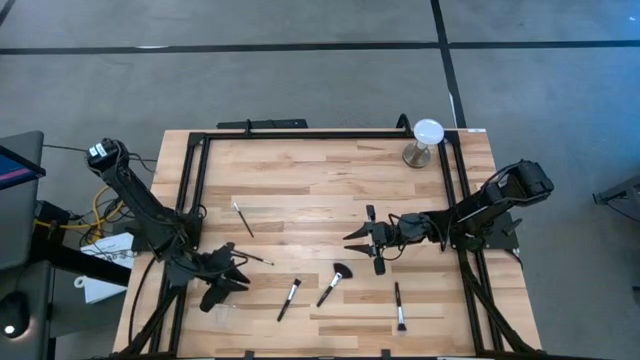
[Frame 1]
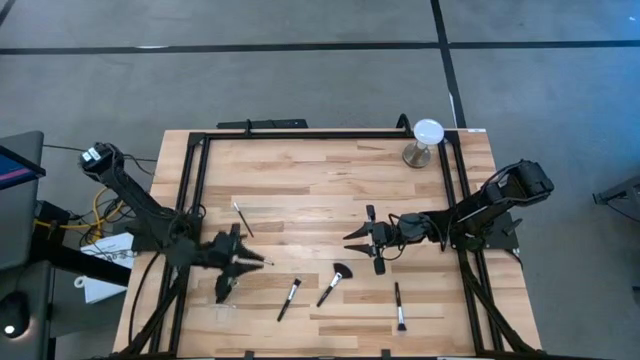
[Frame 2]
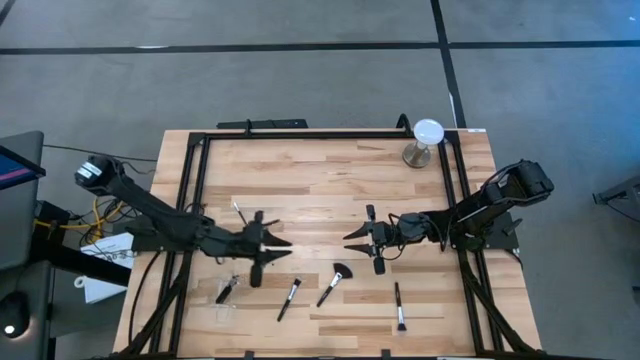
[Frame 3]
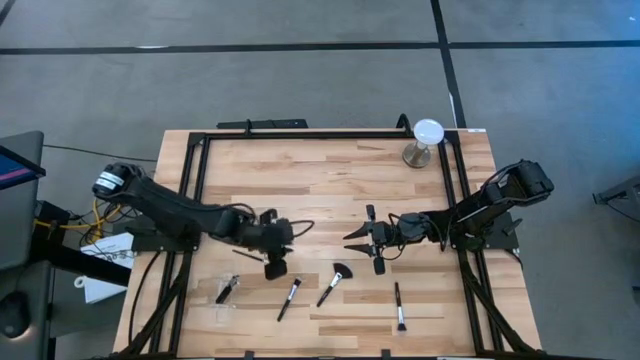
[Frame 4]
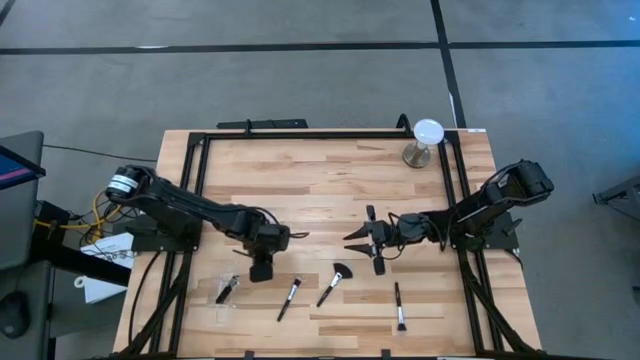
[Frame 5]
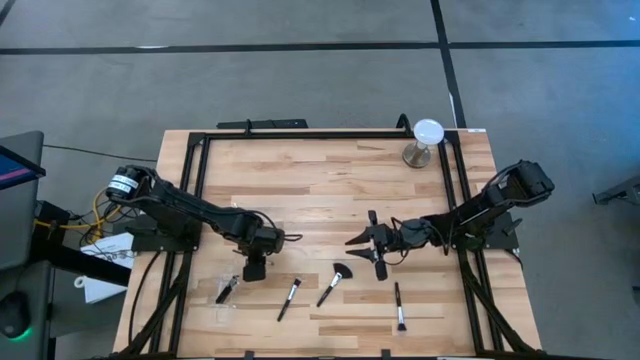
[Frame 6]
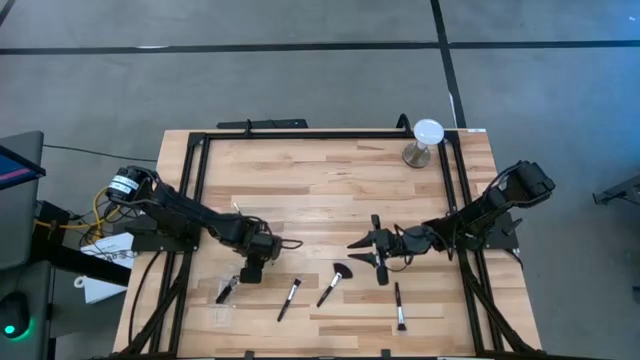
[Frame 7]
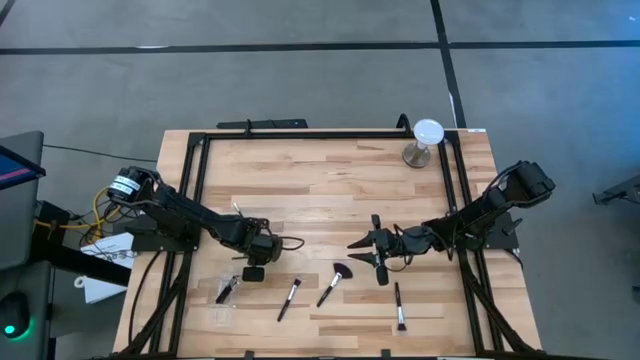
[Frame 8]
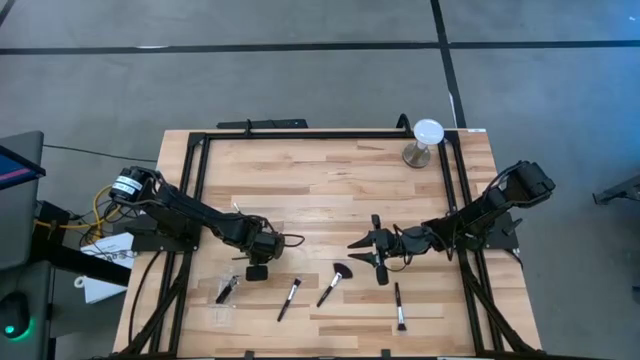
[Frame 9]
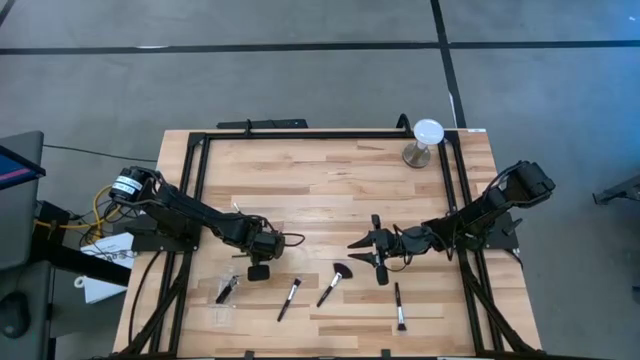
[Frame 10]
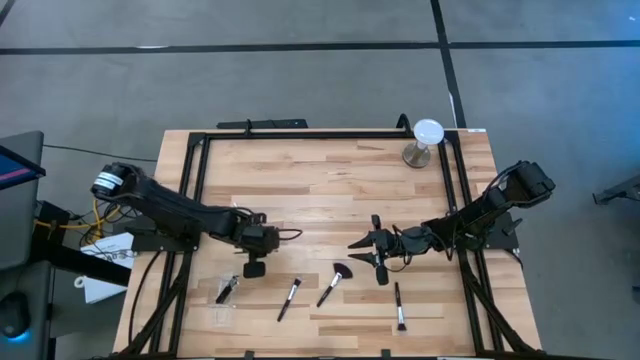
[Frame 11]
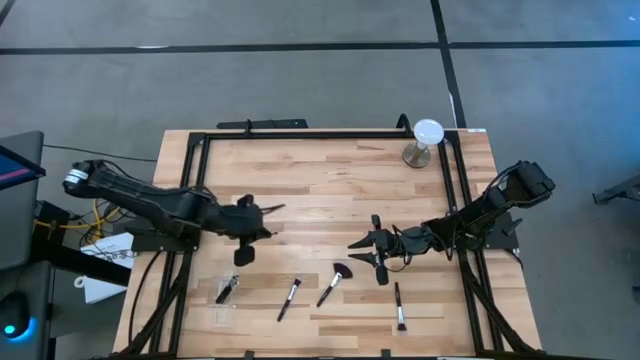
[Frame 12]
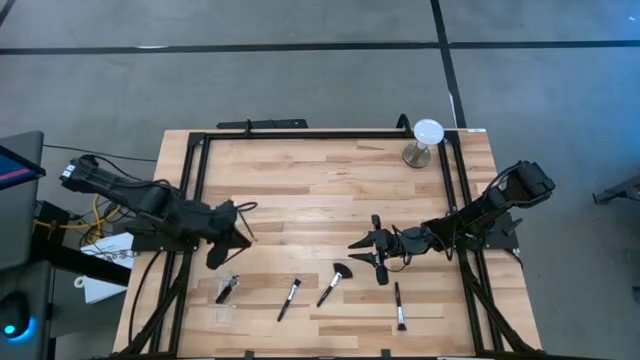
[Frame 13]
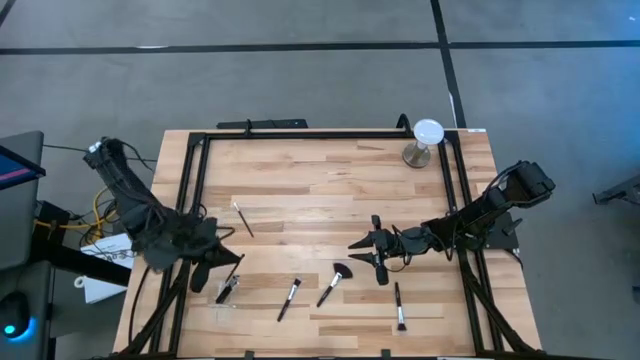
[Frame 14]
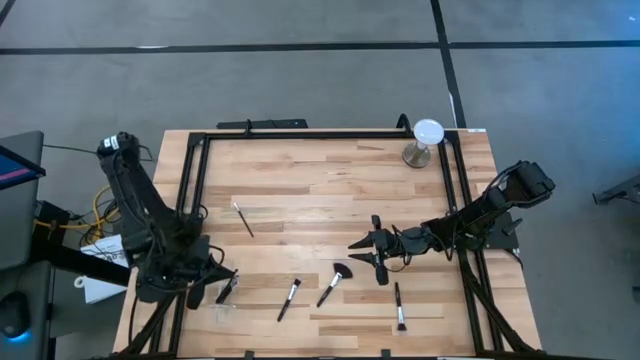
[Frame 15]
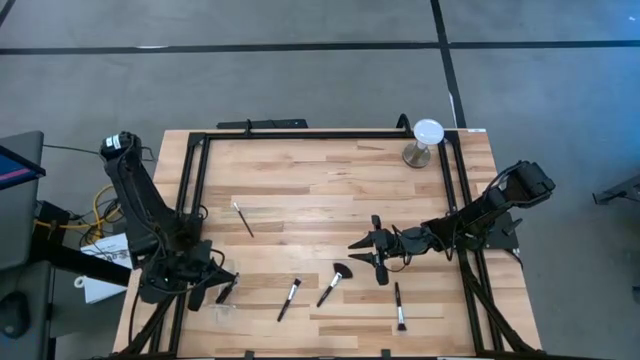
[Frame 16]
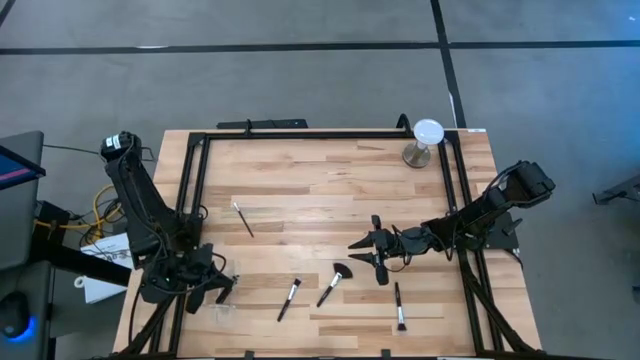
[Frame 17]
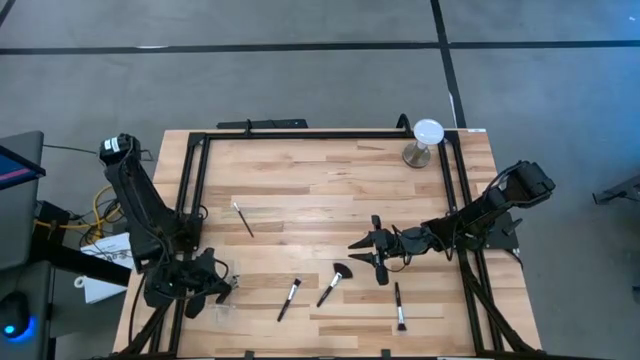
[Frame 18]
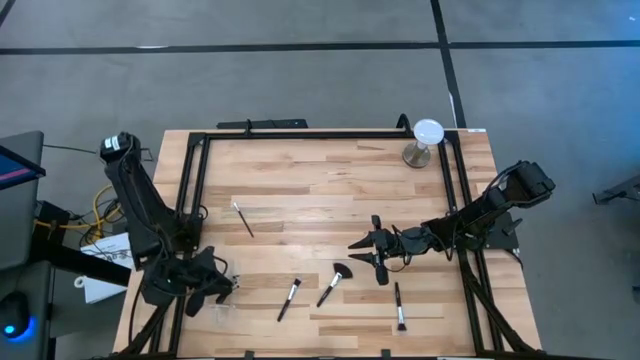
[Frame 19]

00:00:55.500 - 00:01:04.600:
Task: Put items in baskets/containers
Put the eyeshadow brush into the transparent organizer

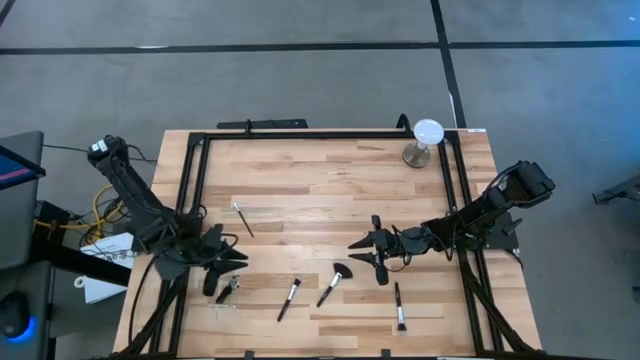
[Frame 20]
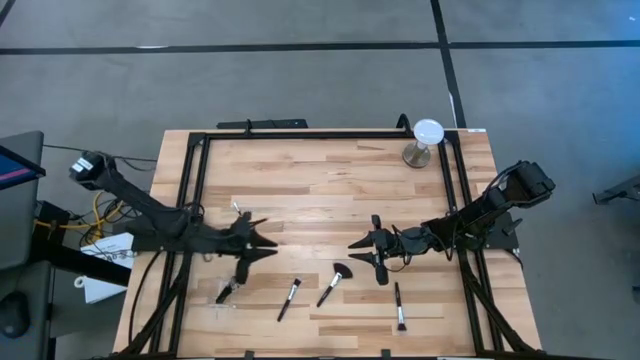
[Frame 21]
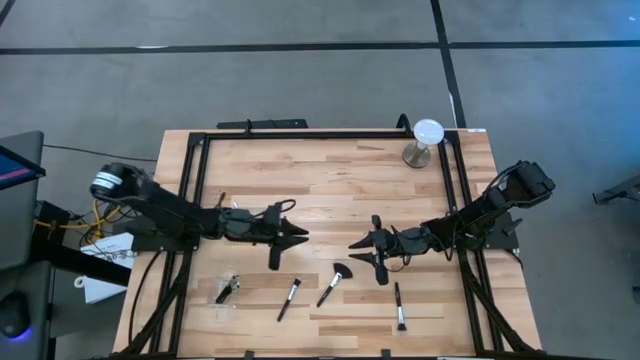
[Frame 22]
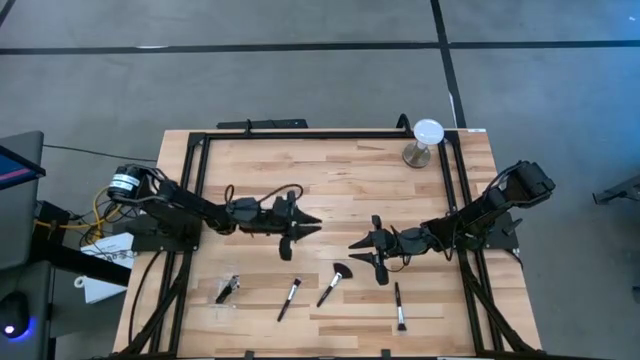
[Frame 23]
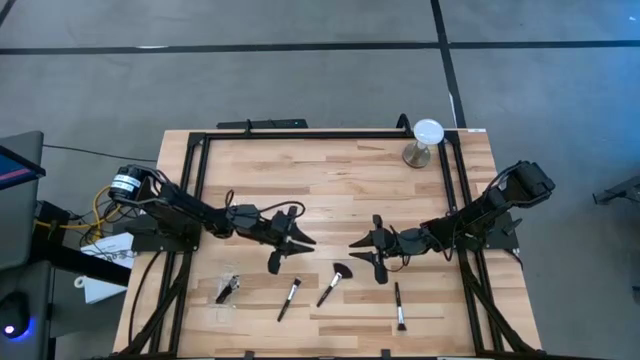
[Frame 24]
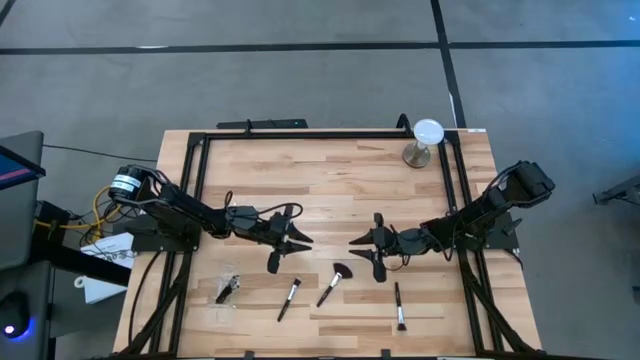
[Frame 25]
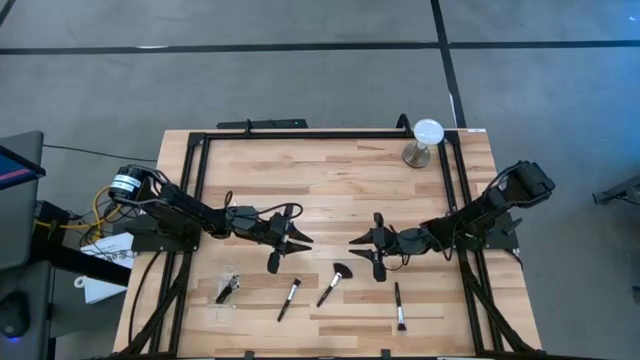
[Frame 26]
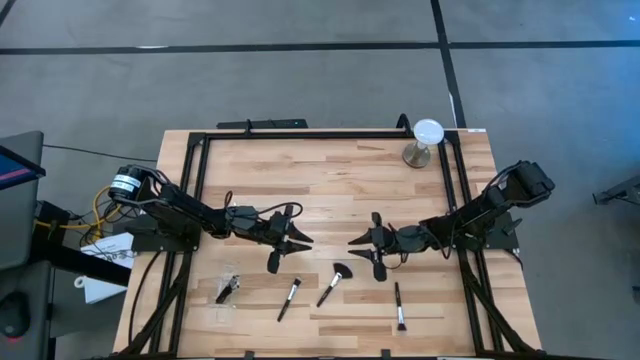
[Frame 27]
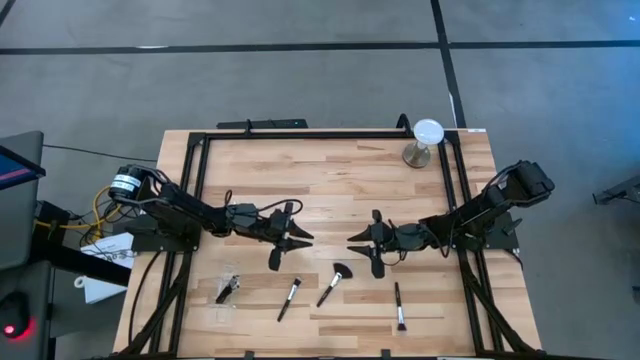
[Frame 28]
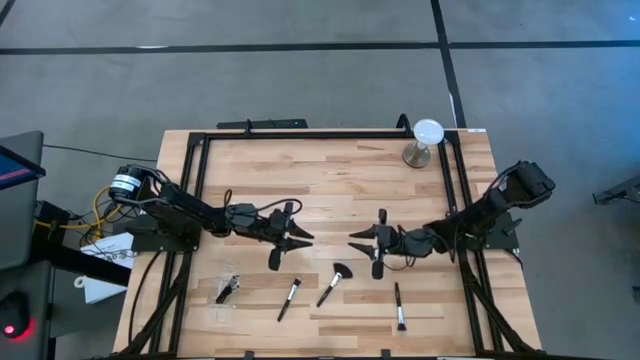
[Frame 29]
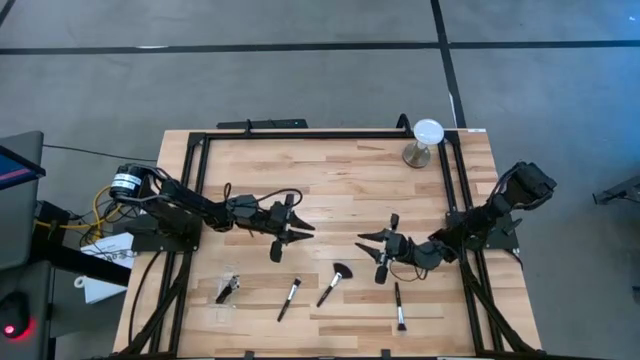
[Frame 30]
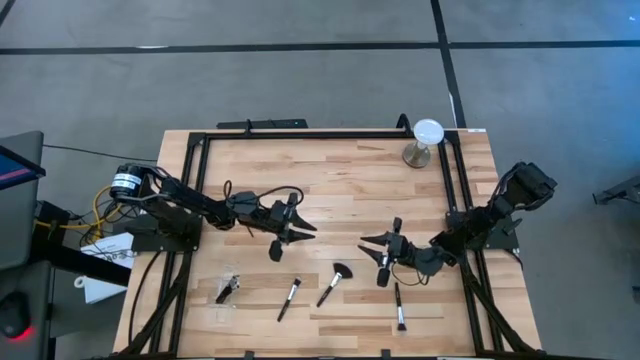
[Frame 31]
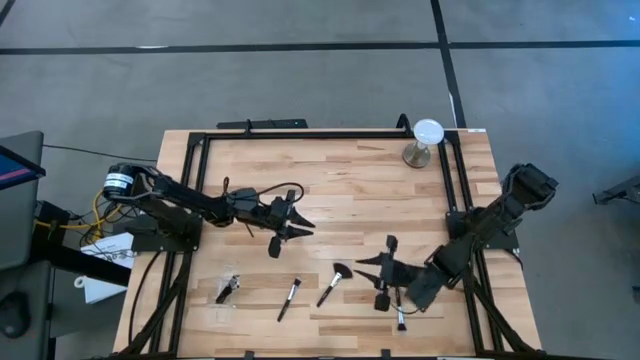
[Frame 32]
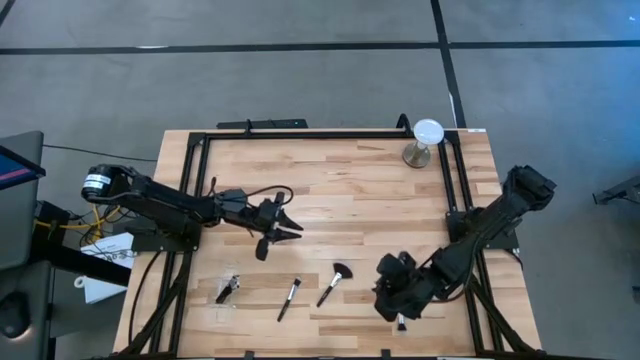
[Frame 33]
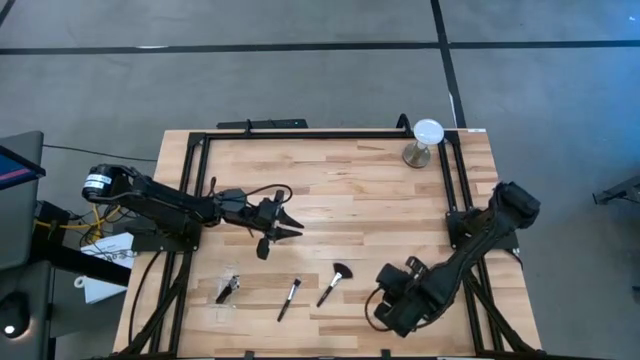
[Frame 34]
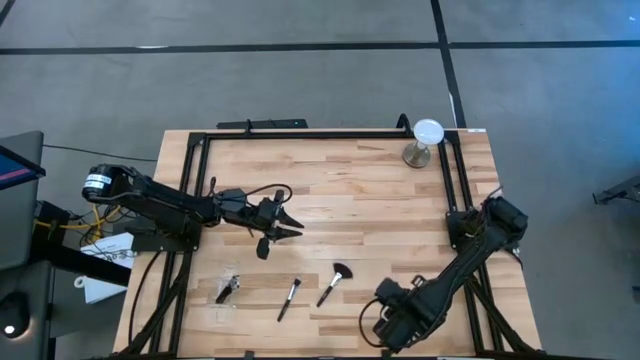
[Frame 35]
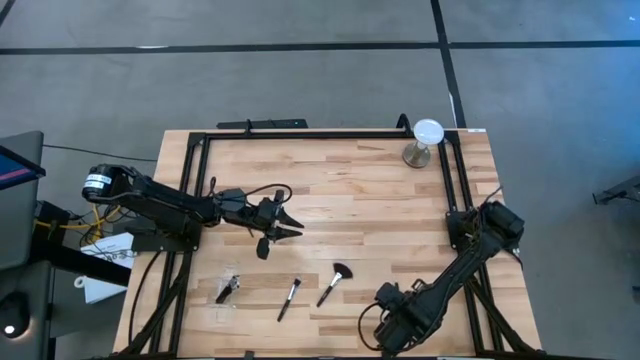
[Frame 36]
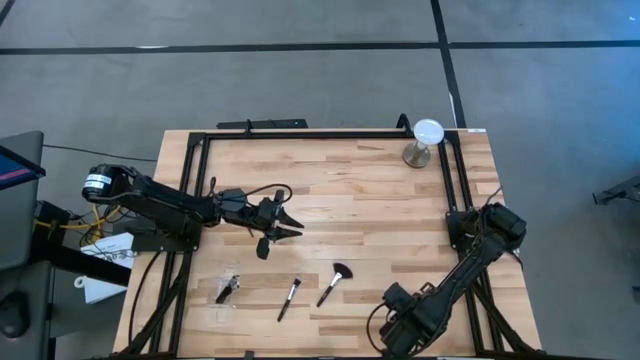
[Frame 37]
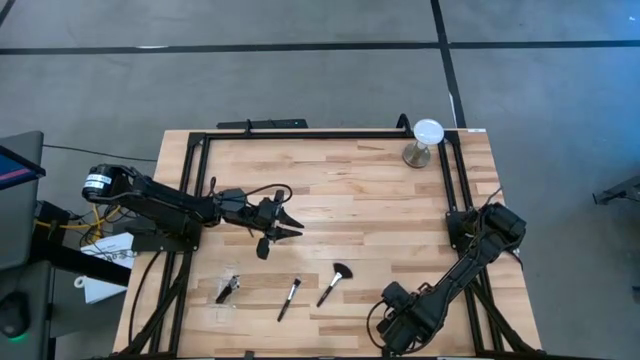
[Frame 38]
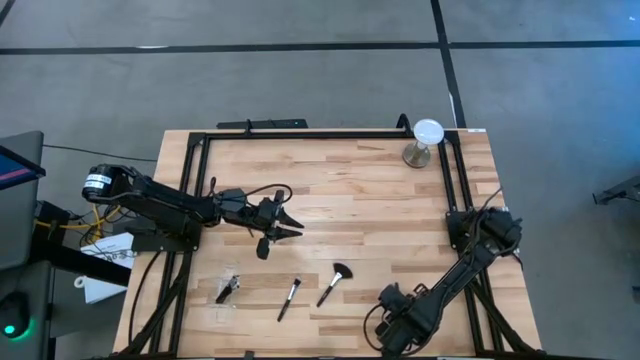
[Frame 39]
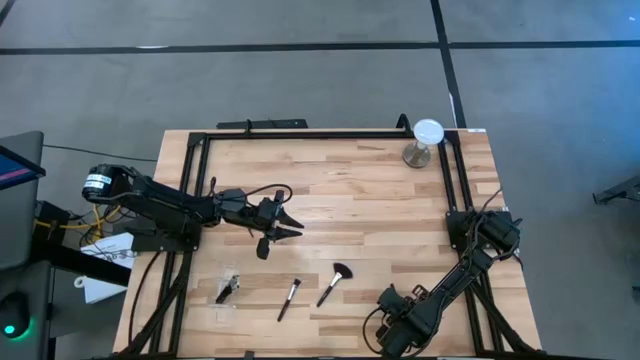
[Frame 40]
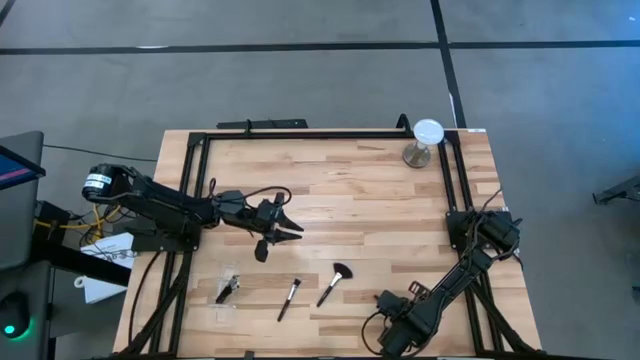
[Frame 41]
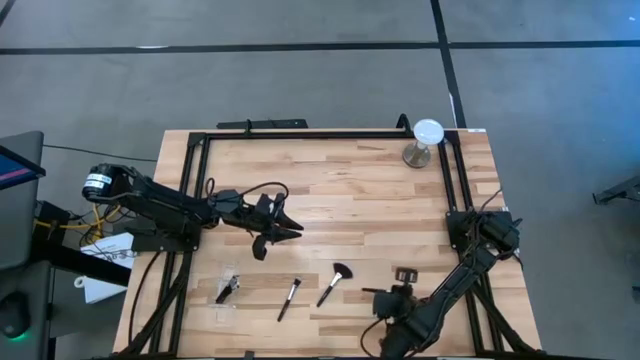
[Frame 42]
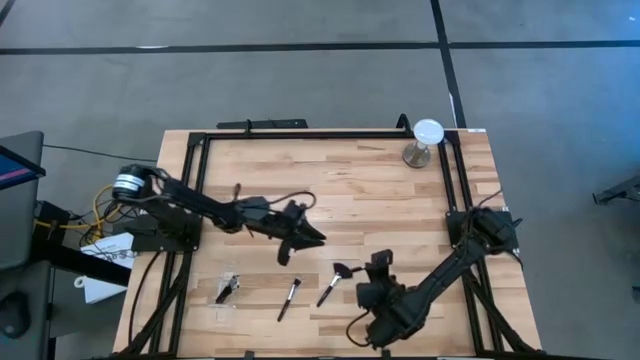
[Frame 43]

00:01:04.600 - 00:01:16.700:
Put the powder brush into the transparent organizer
